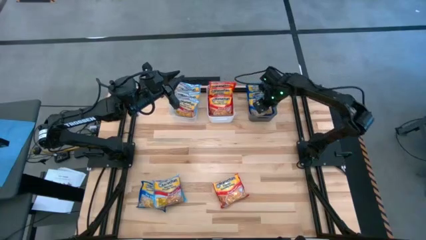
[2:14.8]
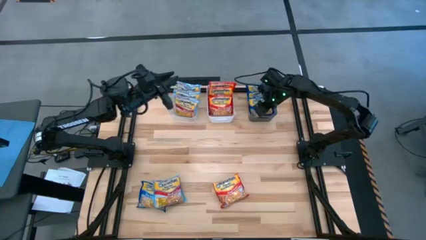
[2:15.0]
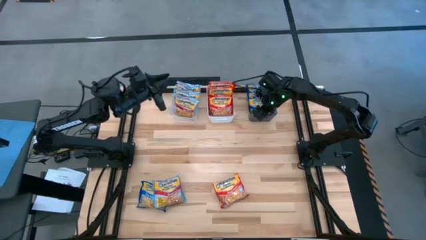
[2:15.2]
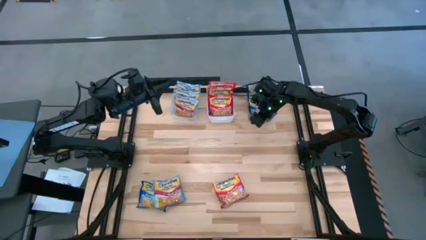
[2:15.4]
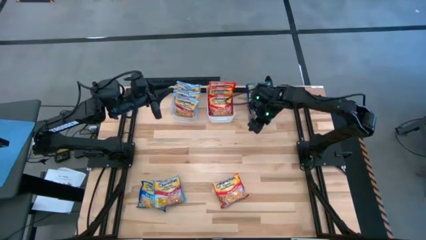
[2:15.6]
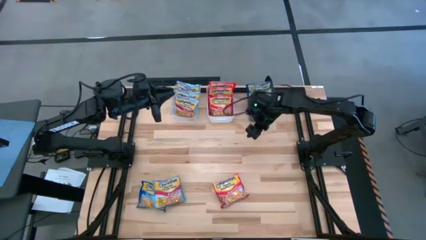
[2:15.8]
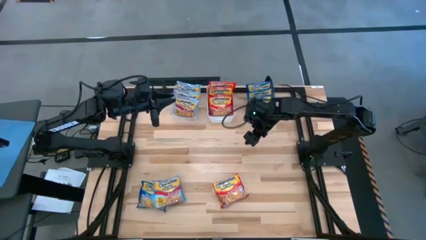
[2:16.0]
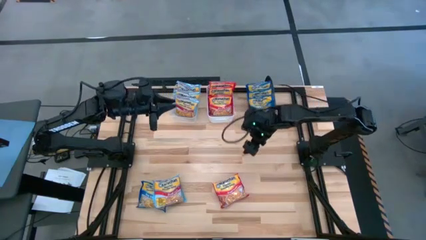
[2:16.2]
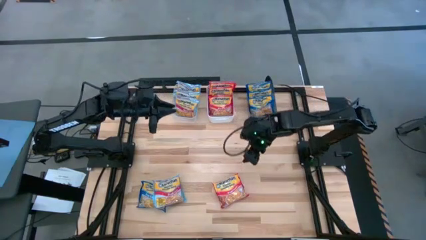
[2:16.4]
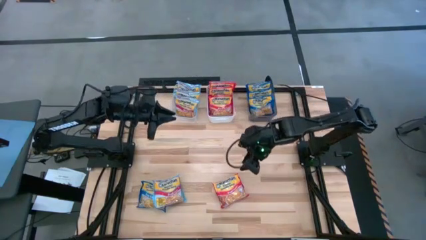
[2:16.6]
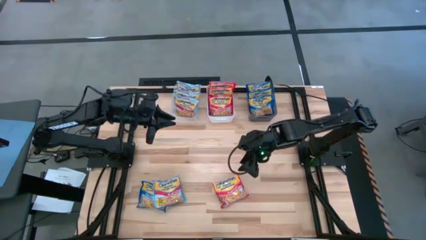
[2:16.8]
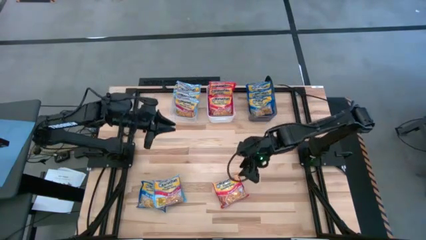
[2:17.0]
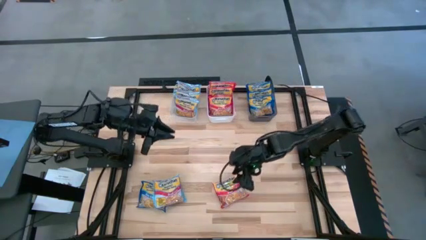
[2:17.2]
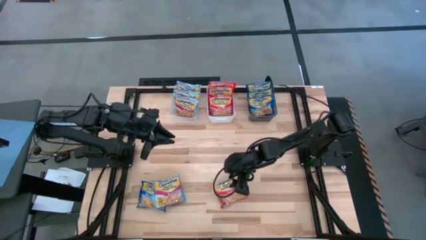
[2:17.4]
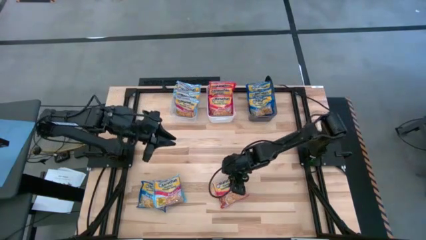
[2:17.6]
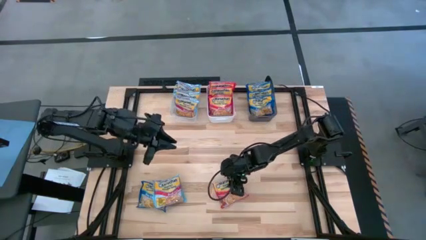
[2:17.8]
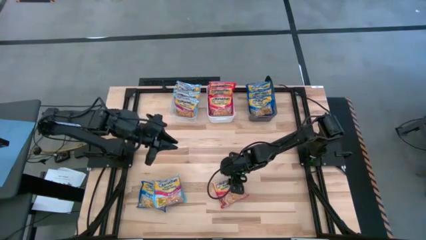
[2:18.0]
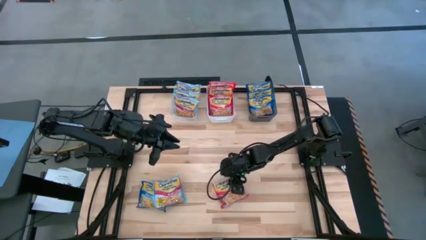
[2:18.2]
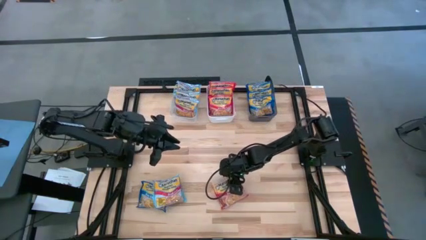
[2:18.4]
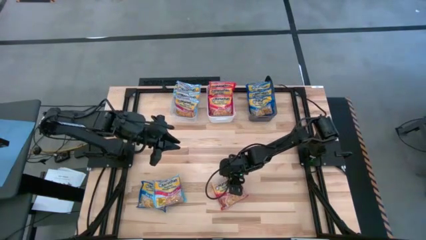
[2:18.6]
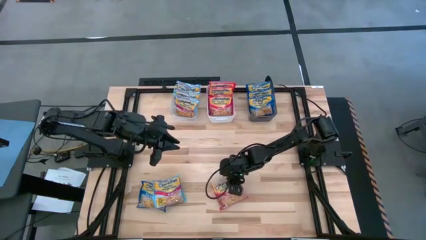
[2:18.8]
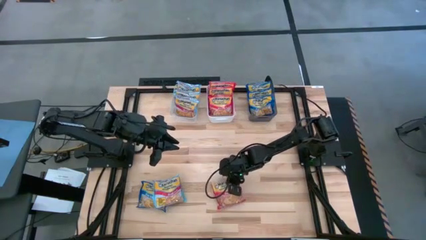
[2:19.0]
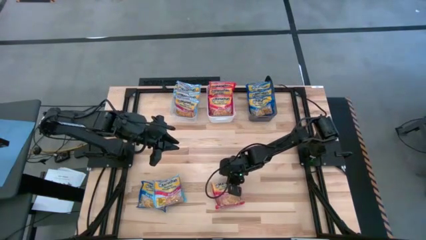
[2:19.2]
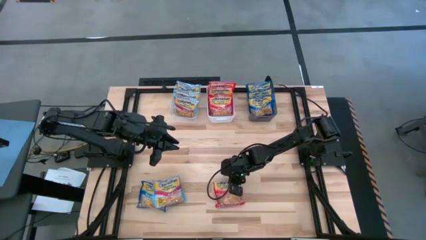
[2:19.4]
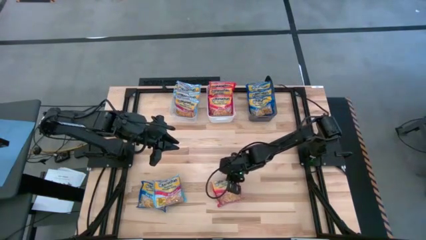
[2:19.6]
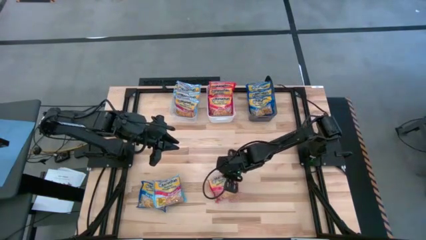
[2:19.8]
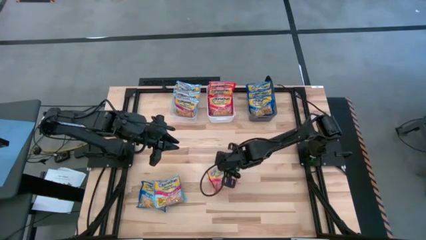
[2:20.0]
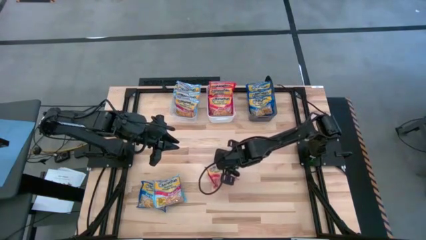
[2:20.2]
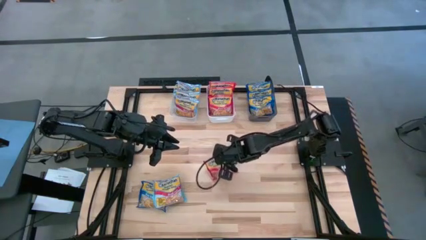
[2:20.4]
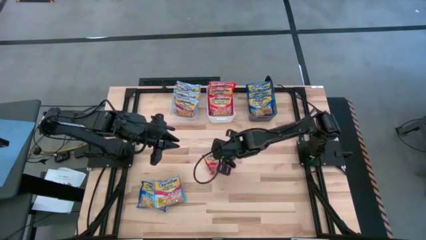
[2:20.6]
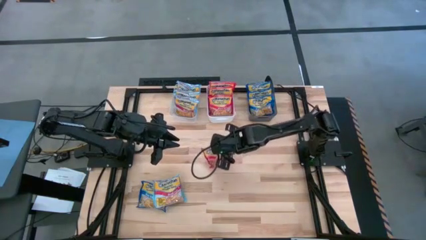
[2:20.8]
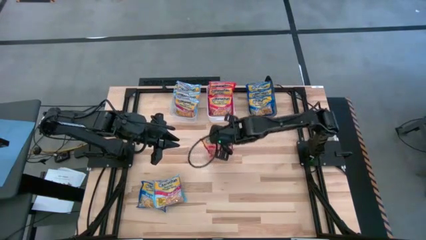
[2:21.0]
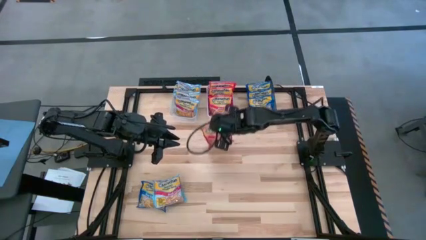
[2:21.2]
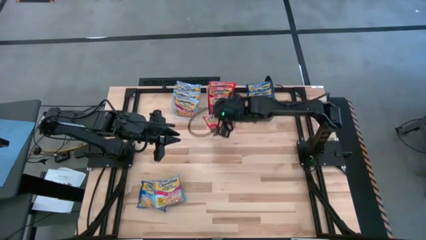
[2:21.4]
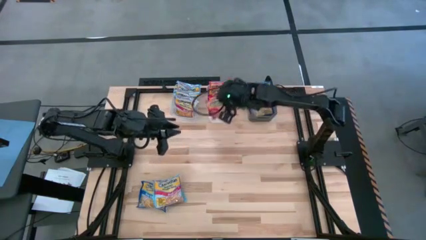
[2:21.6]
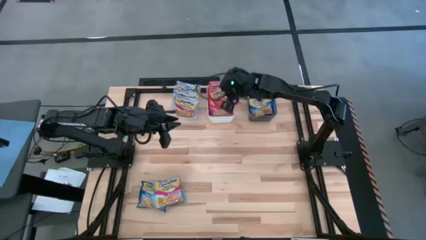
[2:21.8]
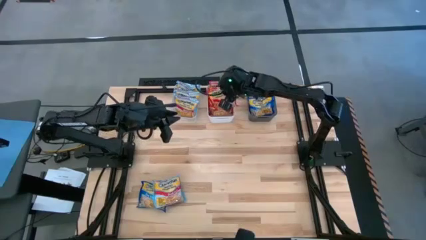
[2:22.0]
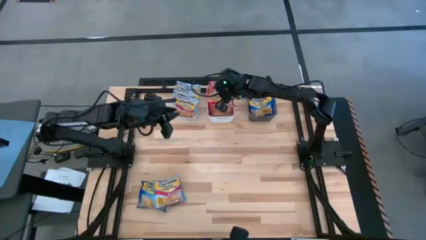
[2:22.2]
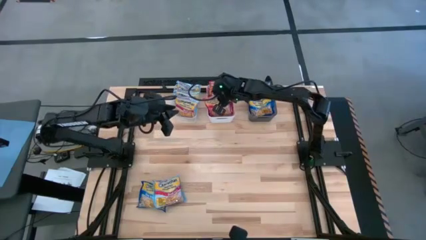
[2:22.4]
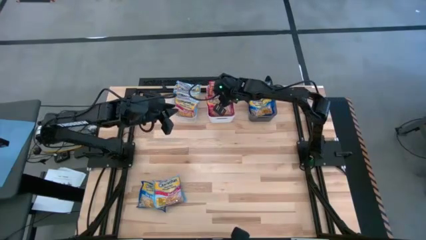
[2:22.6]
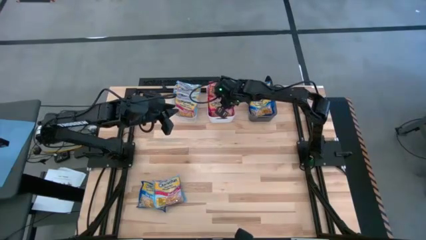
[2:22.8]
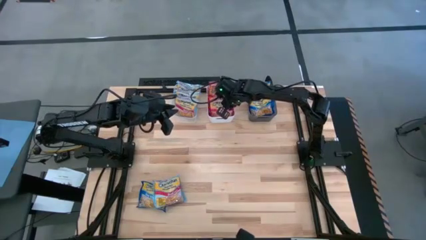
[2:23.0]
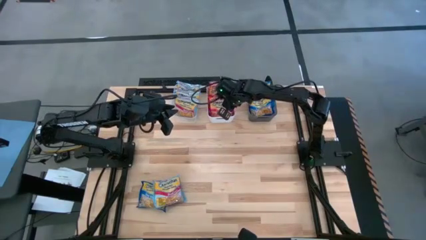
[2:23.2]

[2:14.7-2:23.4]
Task: Sort Maruchan noodles
Put the orange bag into the white bin

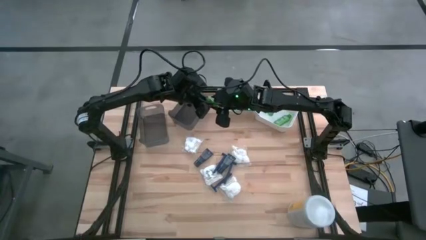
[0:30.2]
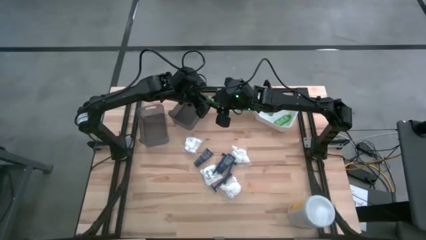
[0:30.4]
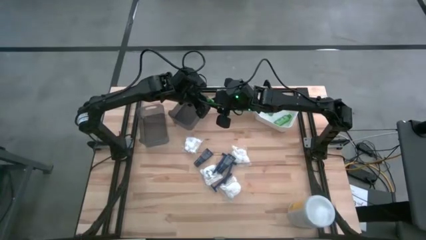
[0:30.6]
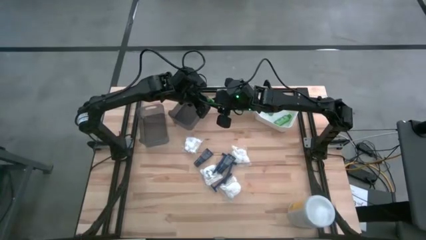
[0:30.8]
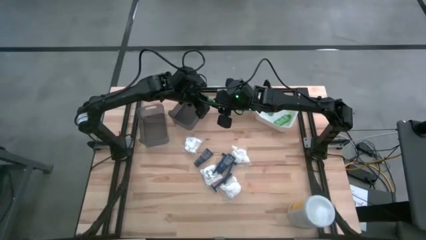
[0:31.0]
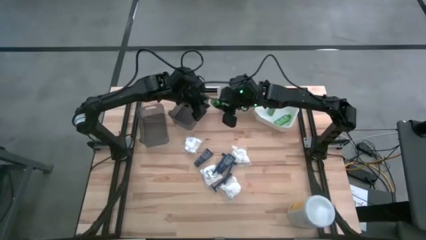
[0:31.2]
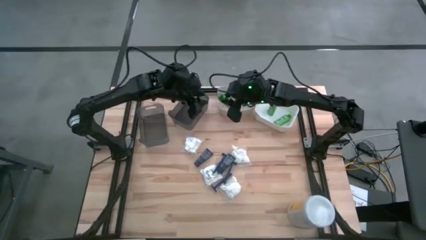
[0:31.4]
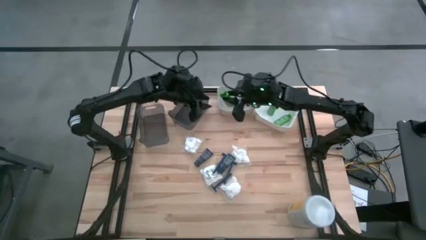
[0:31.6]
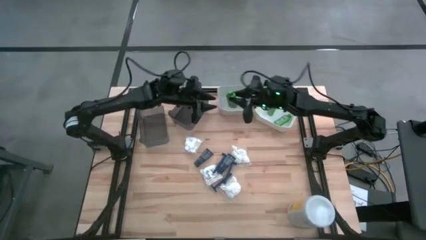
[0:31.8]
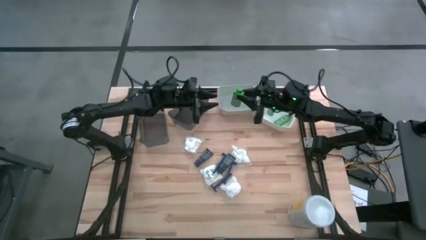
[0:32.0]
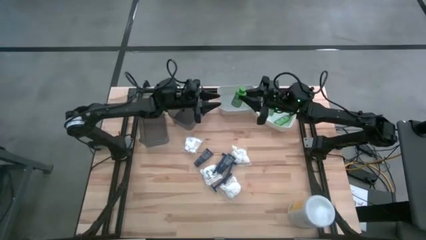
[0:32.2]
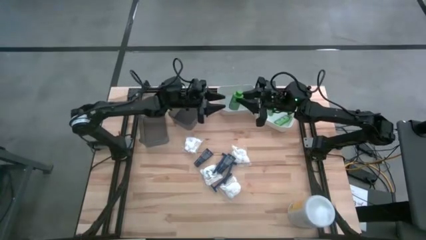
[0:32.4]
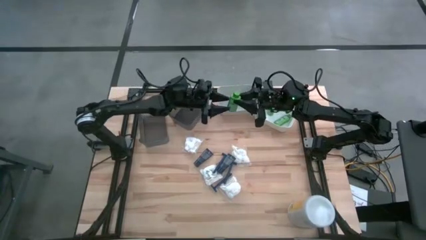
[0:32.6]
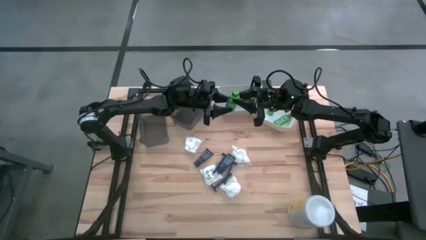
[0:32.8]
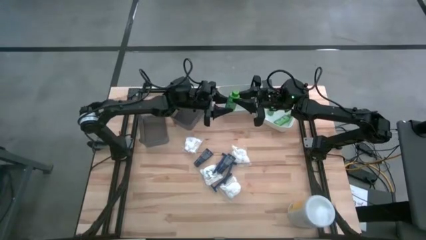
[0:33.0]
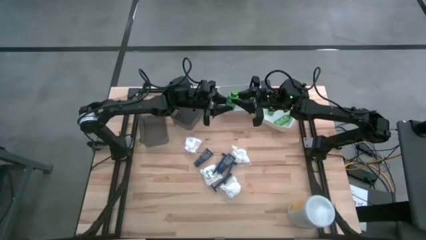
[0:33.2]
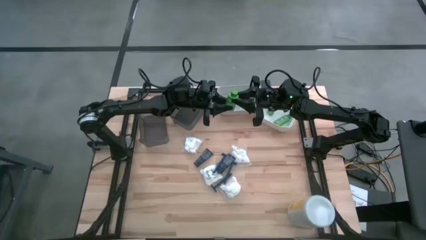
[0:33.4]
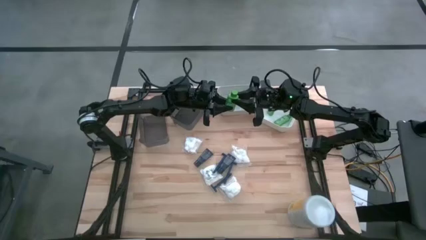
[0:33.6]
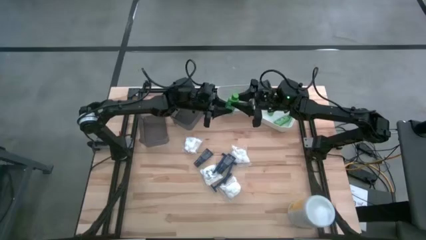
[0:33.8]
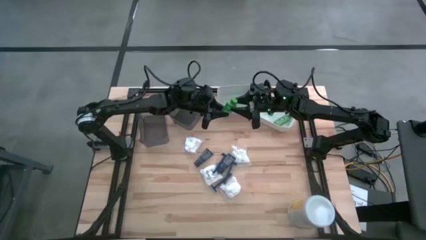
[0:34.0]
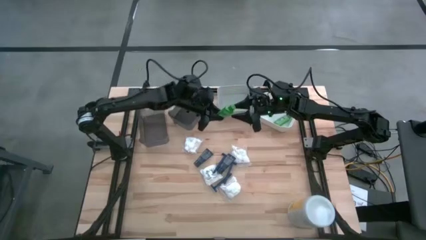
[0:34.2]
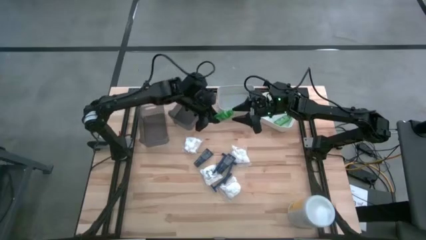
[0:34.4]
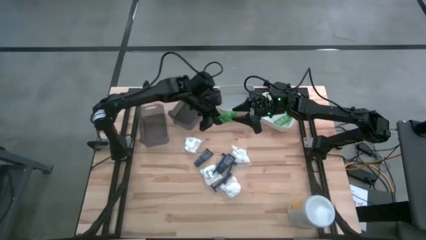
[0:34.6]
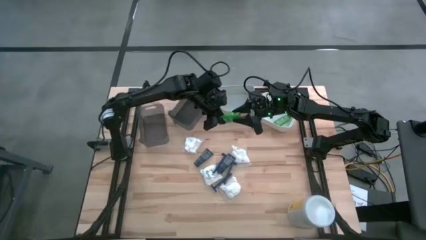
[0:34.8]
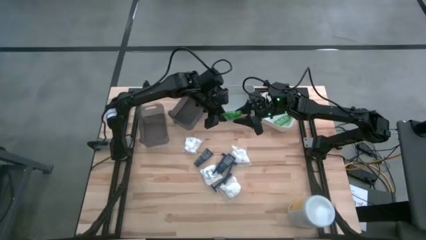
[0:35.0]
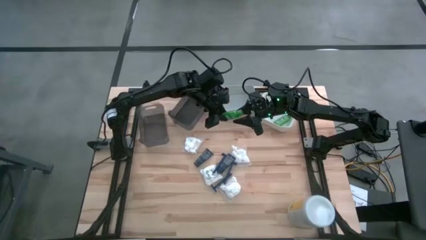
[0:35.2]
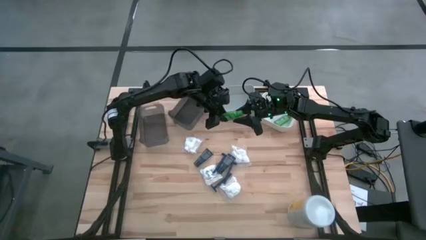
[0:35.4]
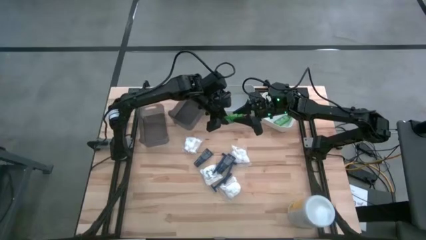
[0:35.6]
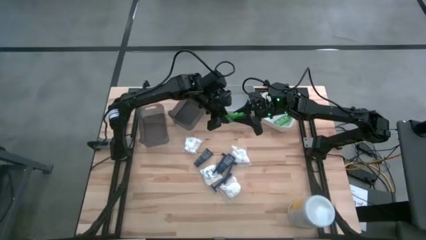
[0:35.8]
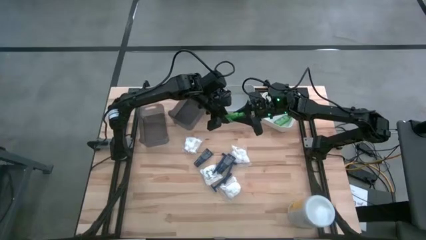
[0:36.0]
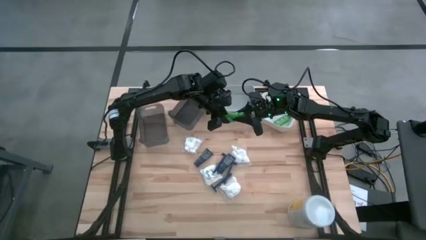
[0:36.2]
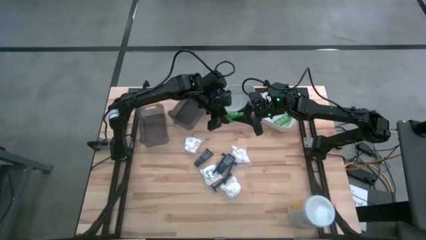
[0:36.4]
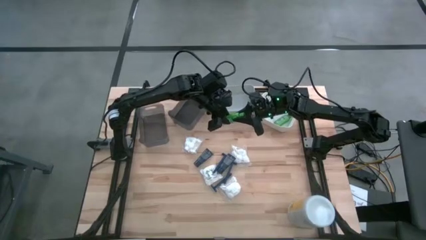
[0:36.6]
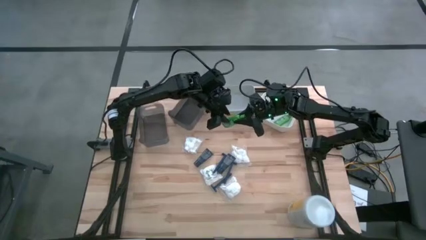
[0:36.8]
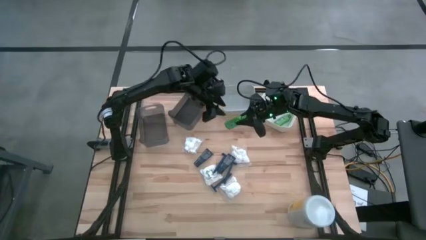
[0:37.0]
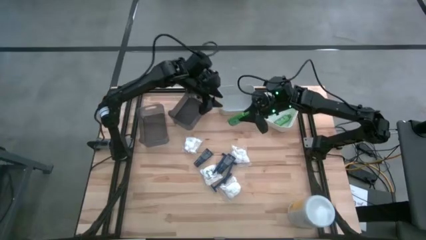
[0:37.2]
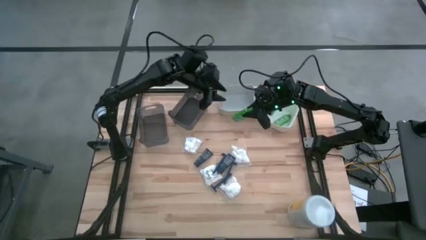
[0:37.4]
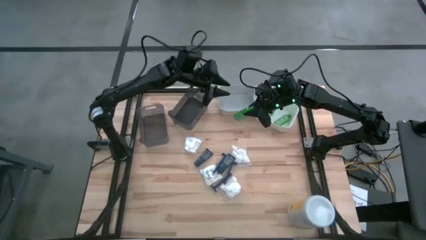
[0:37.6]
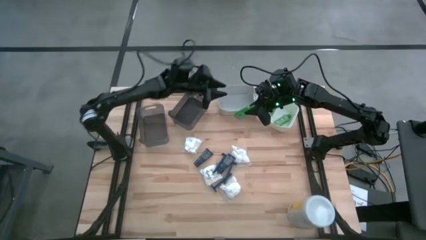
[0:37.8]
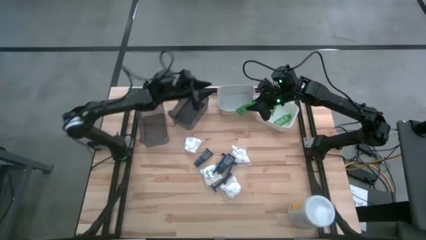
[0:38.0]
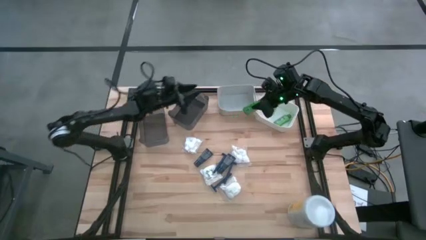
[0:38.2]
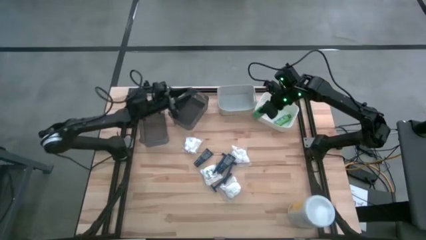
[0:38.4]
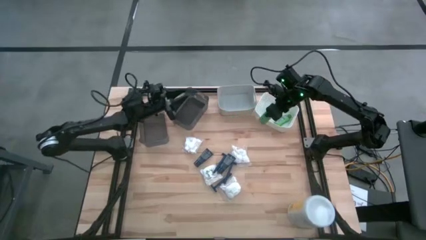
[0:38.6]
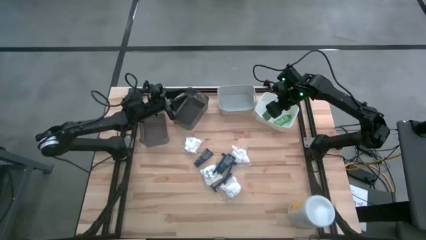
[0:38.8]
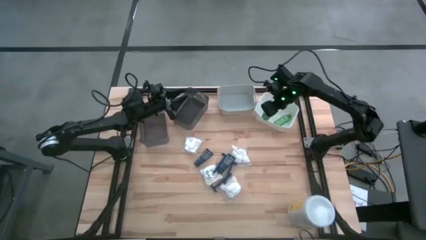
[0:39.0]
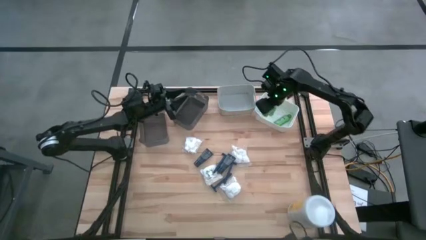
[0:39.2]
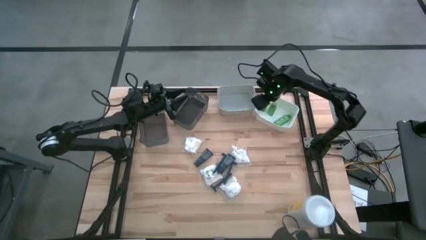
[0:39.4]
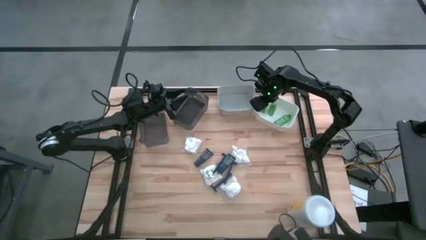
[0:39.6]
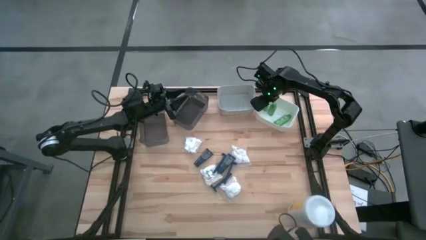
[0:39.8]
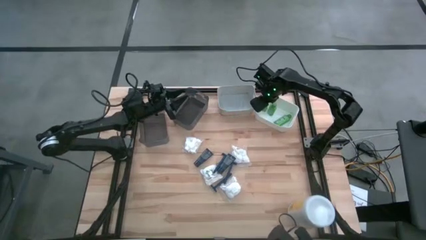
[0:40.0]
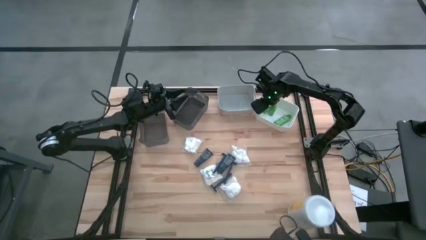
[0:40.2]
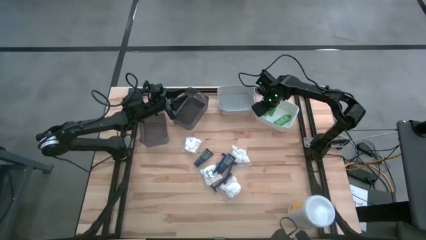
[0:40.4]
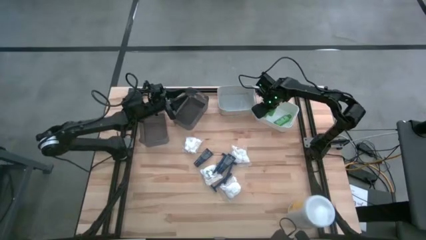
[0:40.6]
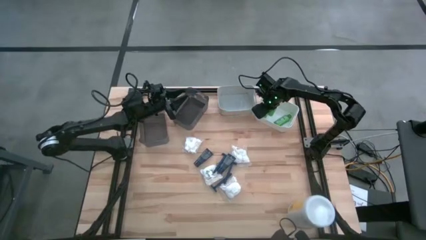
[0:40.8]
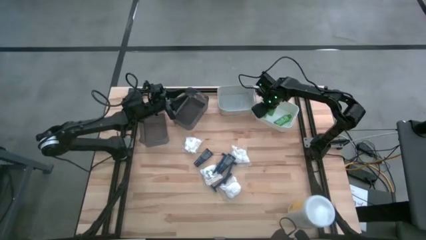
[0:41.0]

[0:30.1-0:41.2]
Task: Pick & Place Travel size toiletries
Put the green shampoo into the white bin
